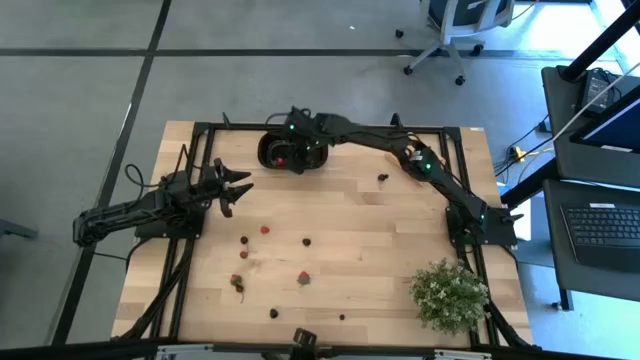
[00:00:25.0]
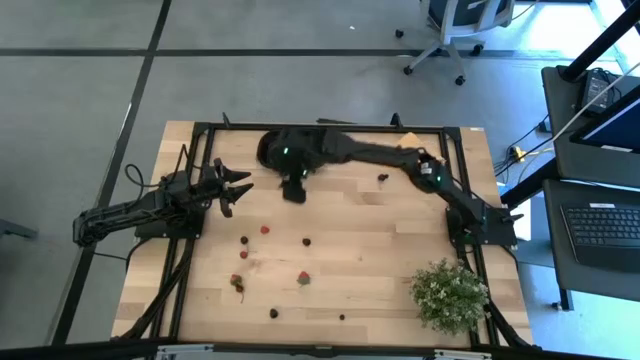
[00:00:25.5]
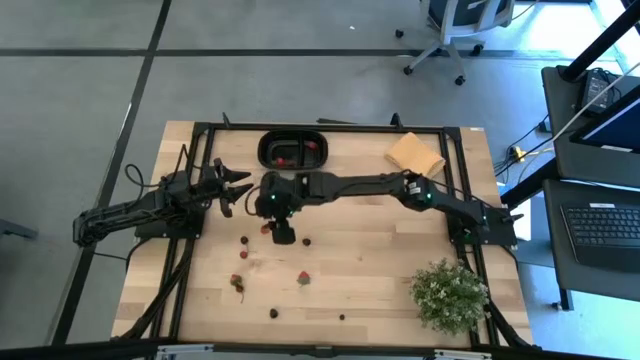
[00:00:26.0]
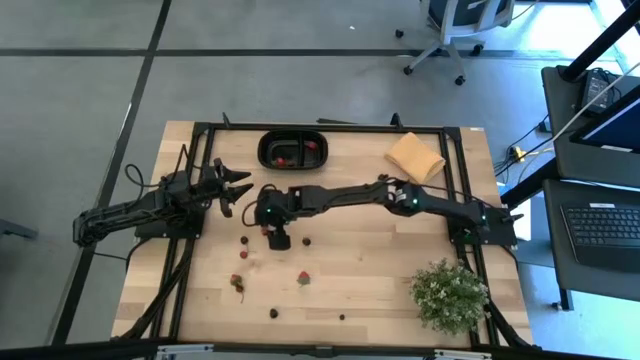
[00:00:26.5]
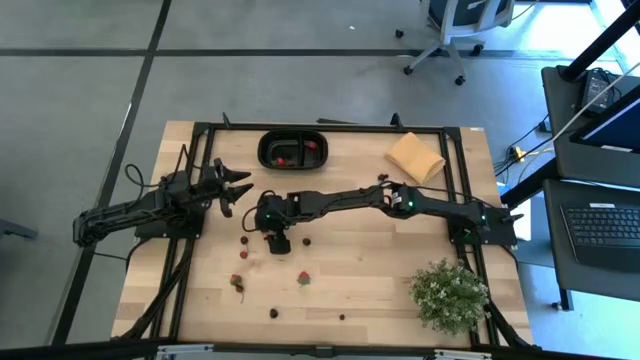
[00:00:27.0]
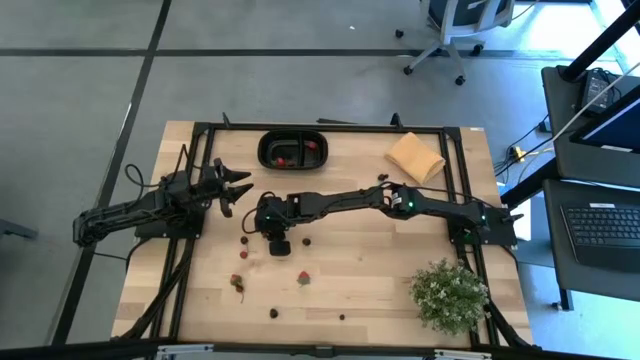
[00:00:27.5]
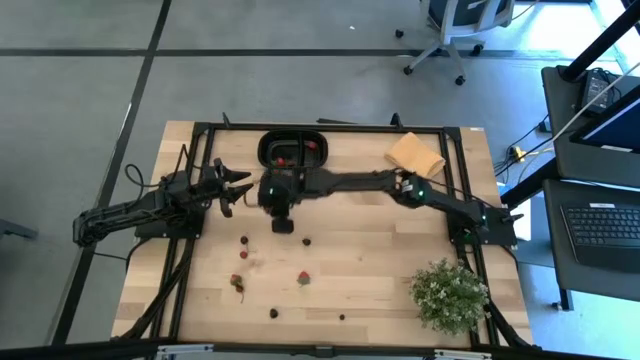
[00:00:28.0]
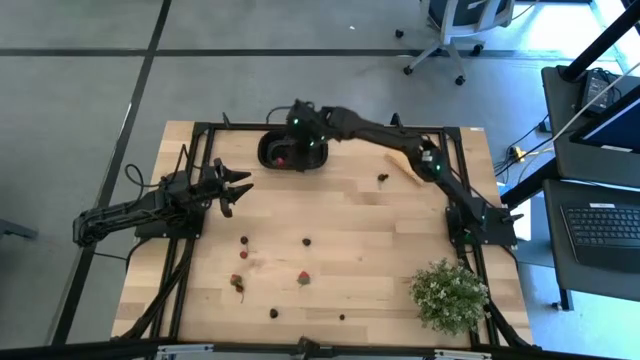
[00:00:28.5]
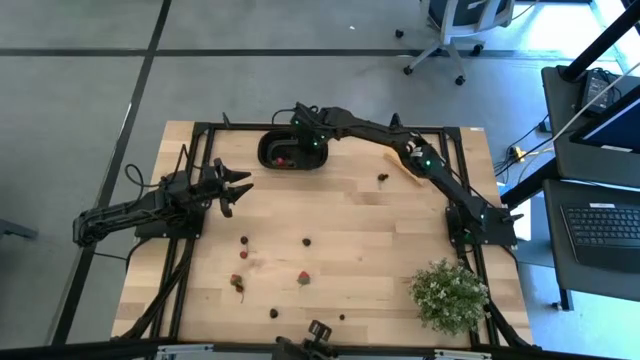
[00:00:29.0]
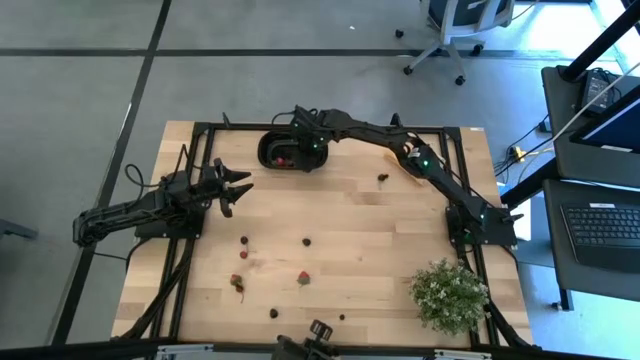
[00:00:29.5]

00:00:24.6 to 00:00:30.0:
Task: Pick and placing Produce into tupperware
Put the raspberry into the black bin

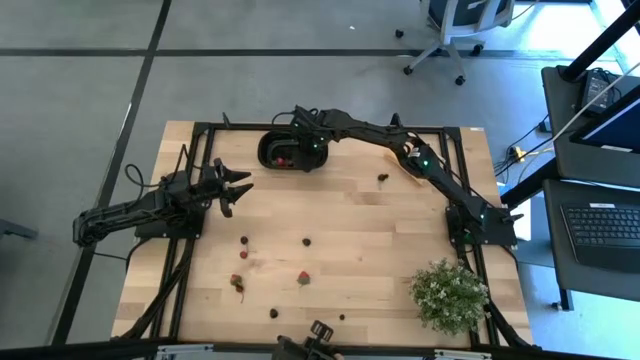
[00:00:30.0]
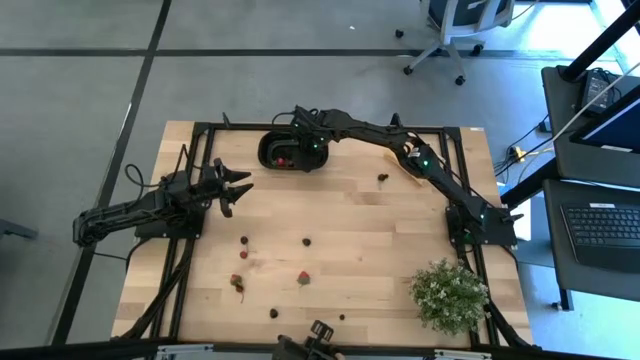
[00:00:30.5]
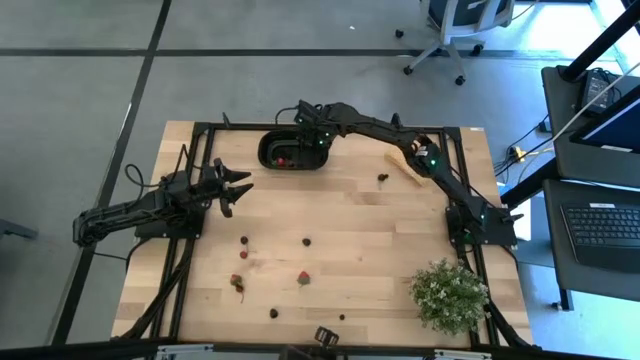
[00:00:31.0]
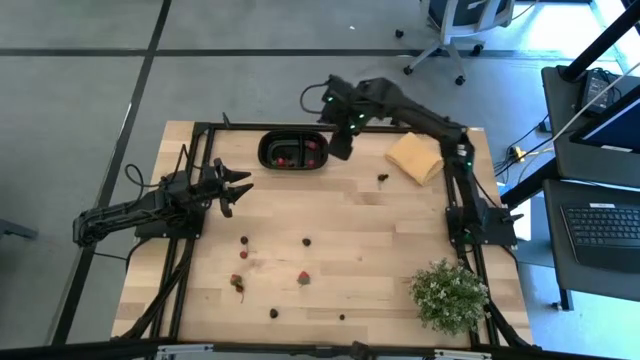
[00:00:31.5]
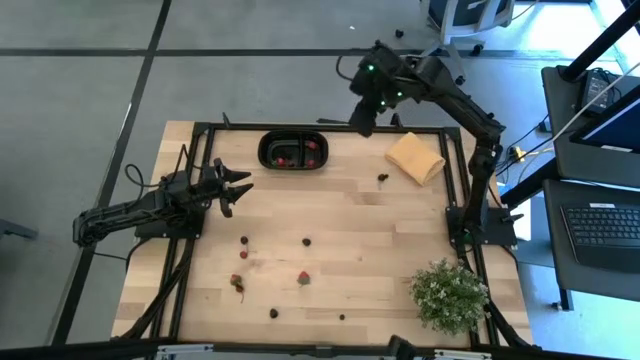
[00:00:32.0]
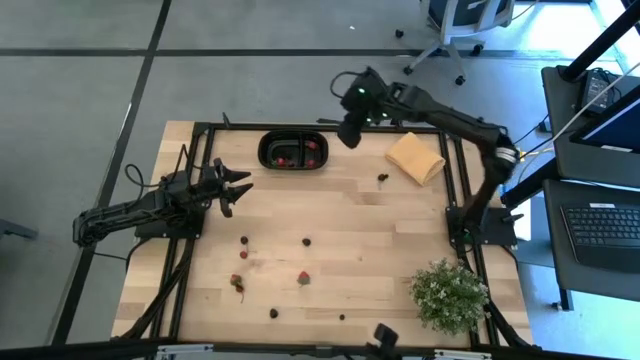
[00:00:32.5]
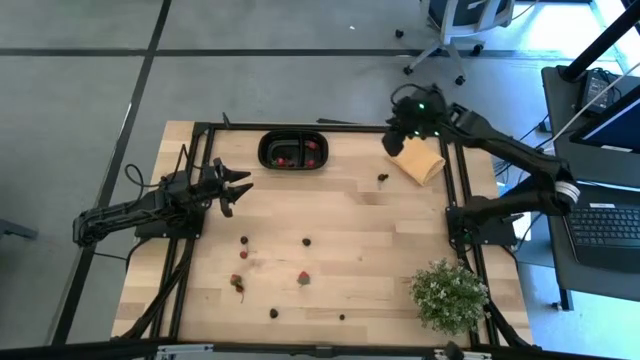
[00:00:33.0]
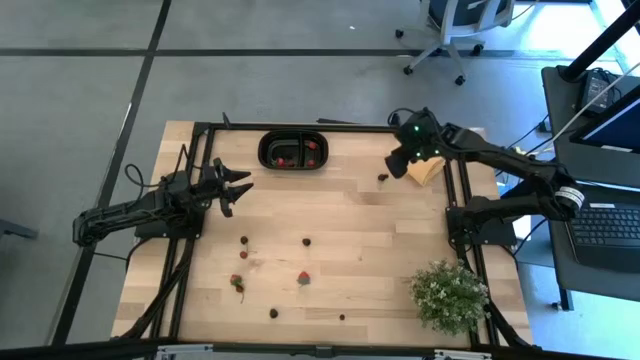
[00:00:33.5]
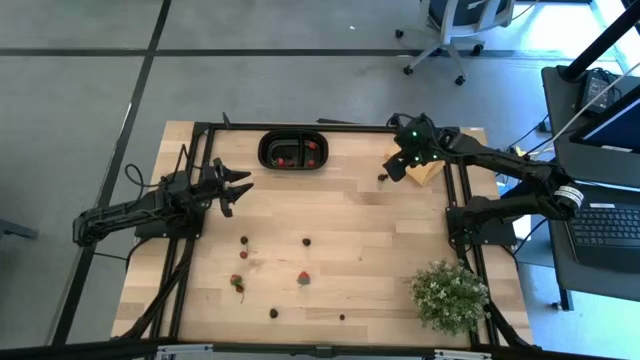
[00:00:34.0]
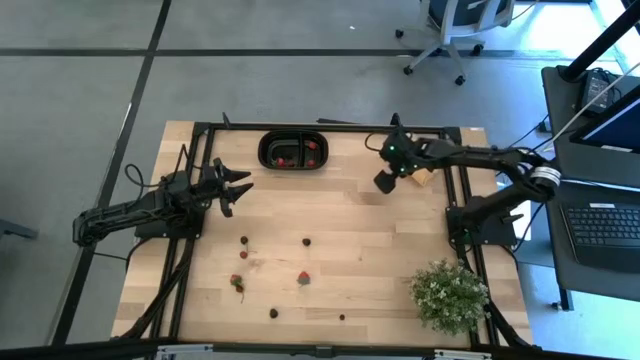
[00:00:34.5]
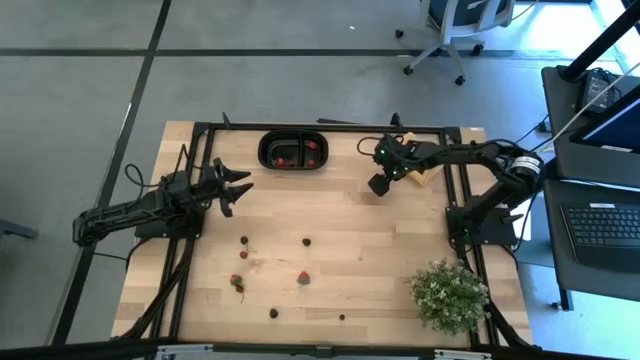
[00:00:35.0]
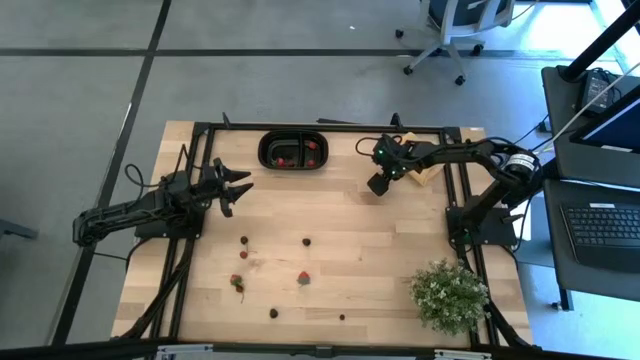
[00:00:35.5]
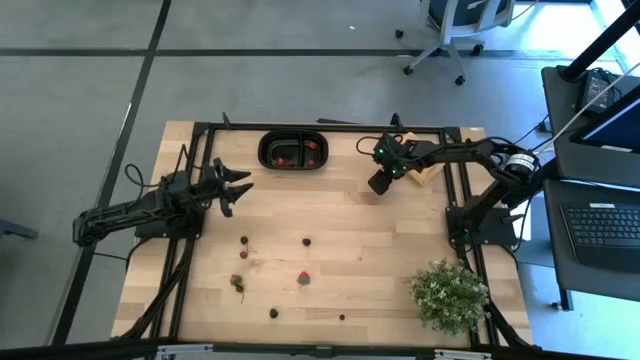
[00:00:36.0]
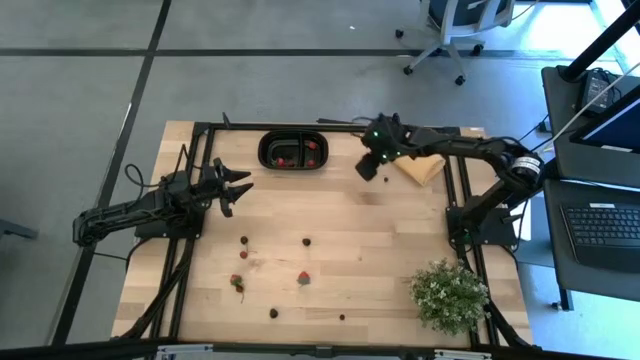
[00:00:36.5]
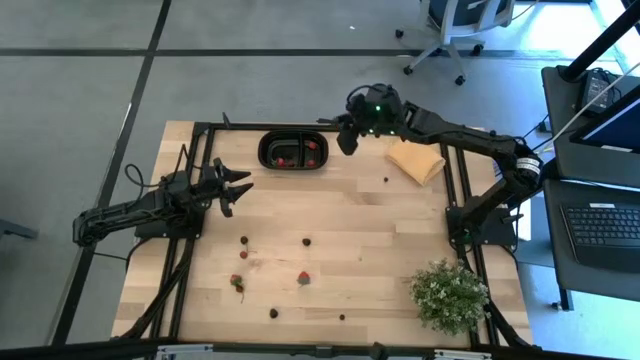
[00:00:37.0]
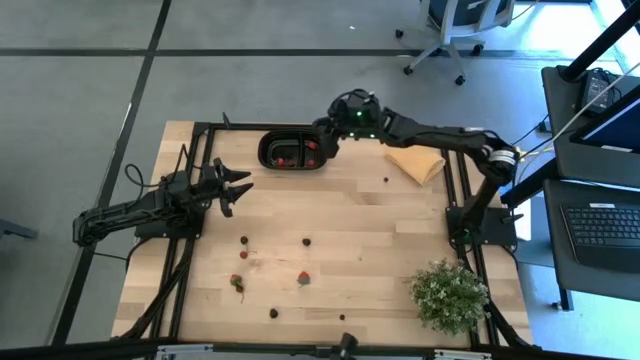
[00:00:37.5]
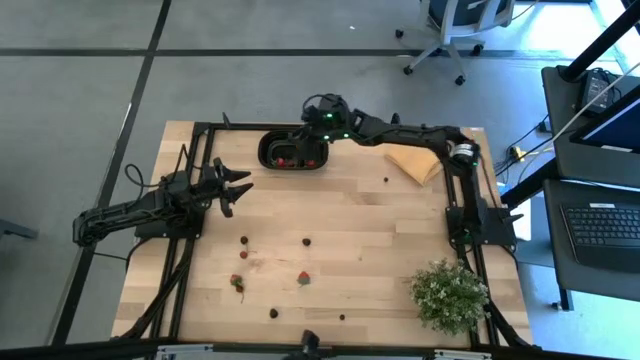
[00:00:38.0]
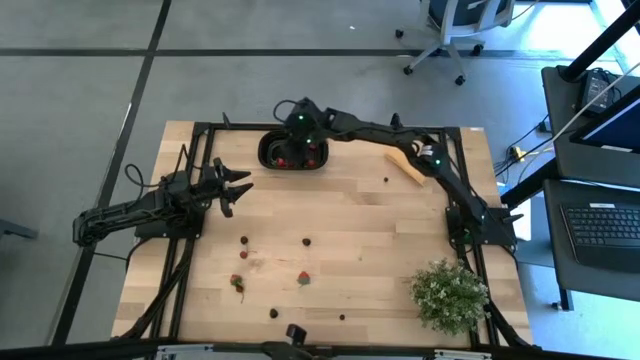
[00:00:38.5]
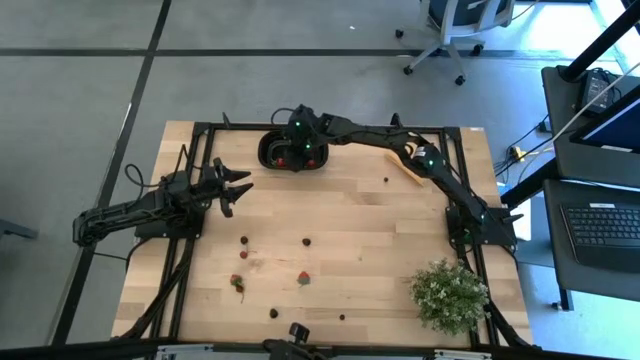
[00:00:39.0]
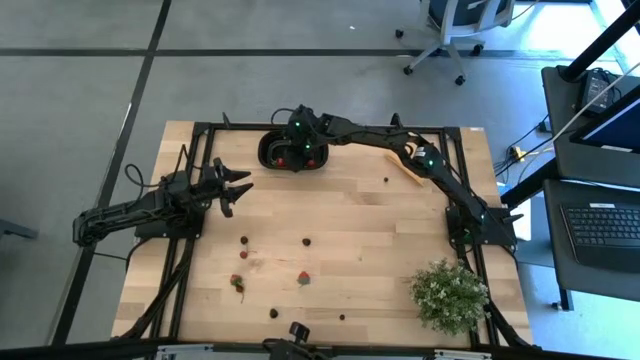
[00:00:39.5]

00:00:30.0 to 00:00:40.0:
Put the top black cherry into the black bin

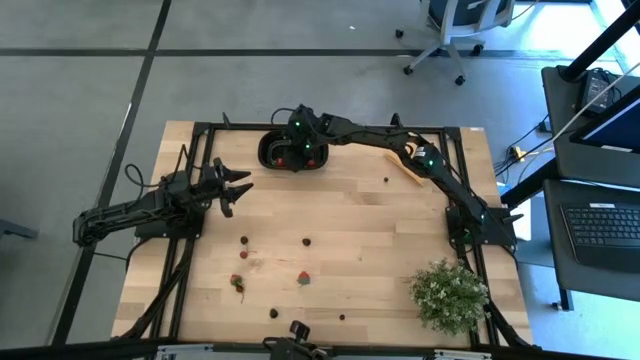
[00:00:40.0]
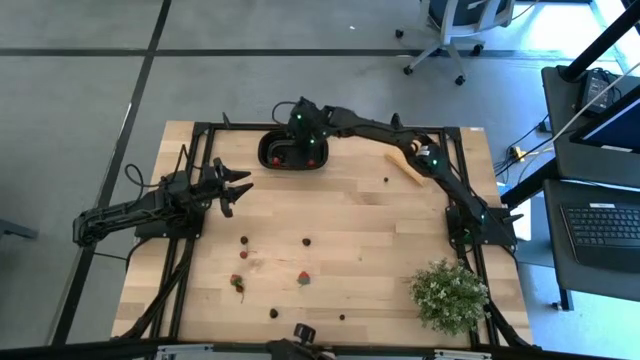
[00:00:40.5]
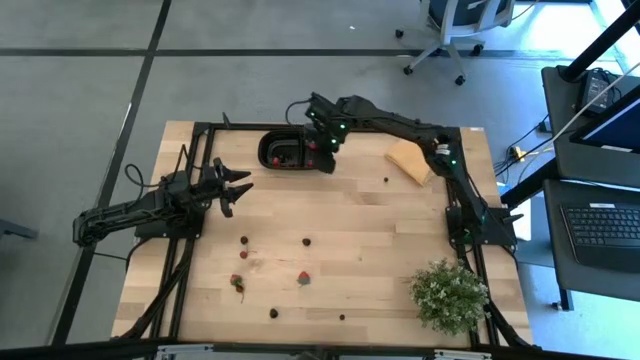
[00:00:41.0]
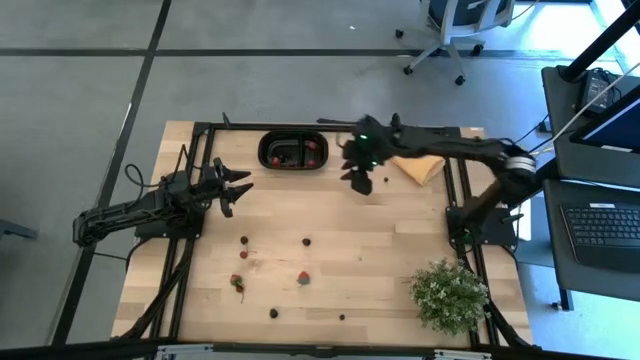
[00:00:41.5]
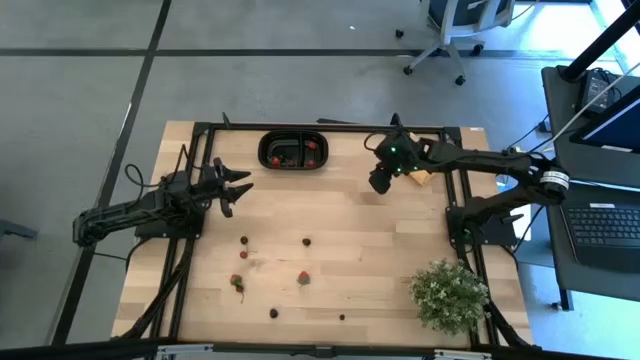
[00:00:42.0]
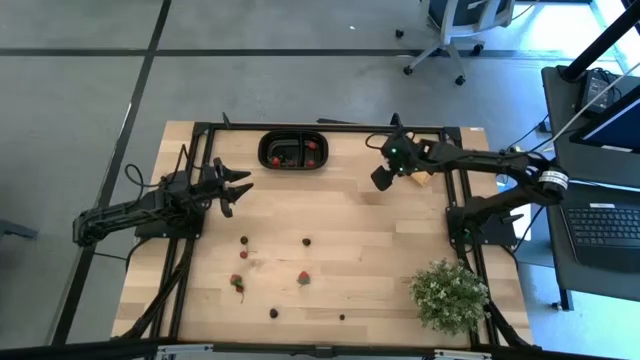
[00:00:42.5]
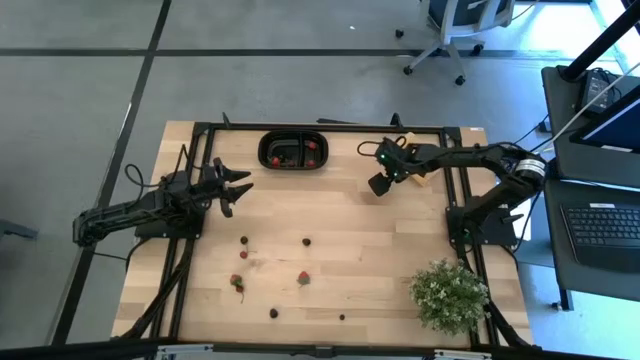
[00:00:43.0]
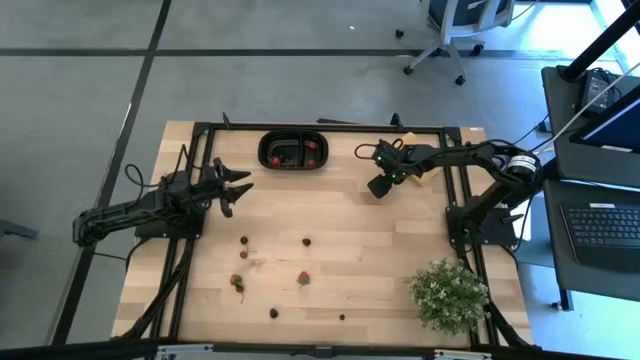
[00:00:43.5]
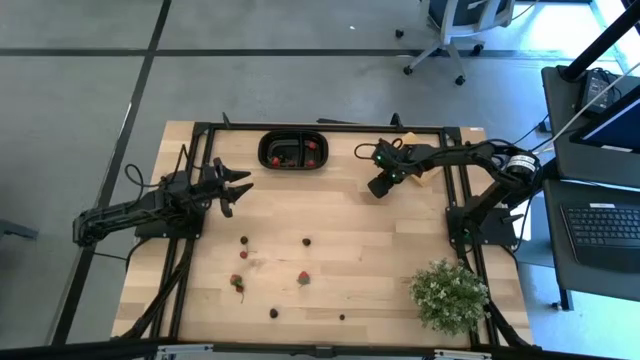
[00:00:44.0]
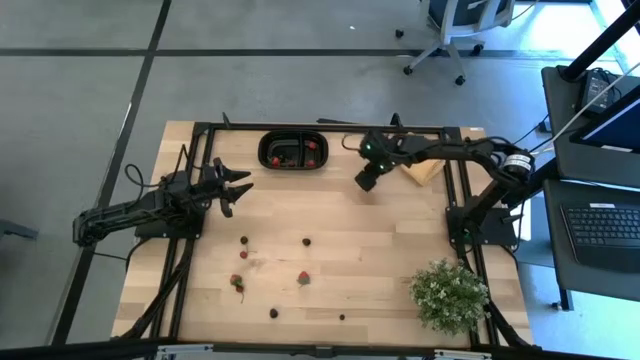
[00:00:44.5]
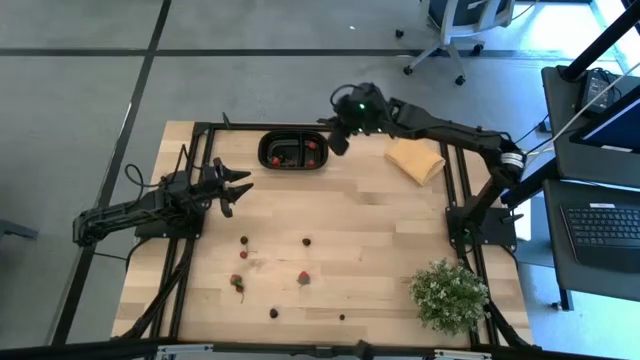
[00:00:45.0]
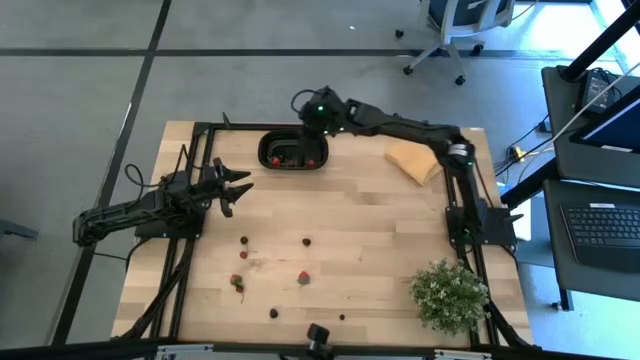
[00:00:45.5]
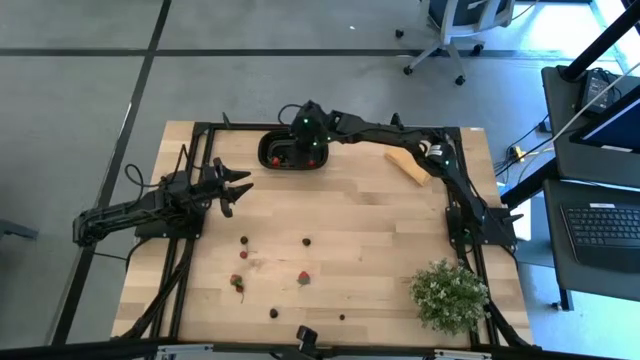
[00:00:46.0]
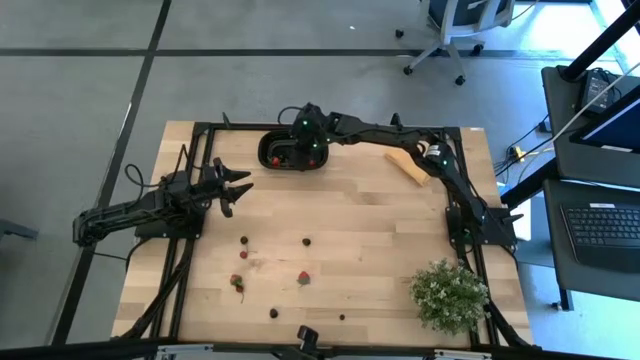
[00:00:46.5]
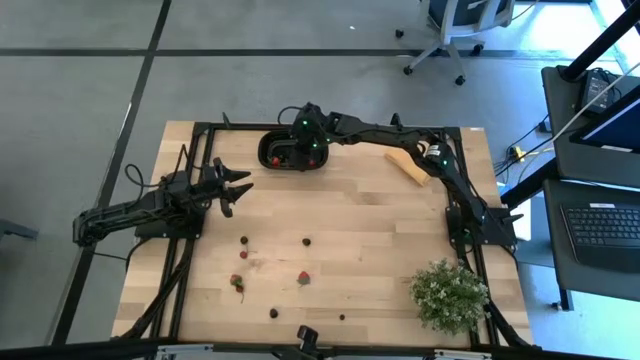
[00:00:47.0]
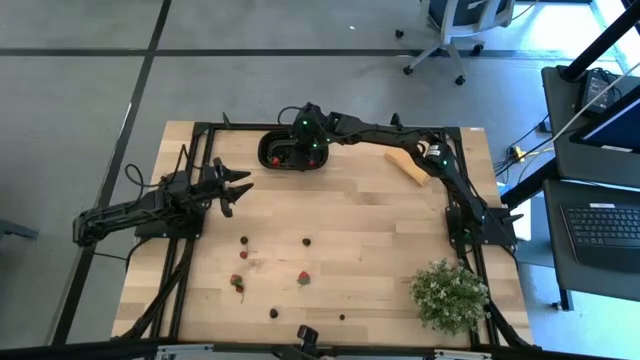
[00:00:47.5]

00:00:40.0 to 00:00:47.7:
Put the top blueberry into the black bin
